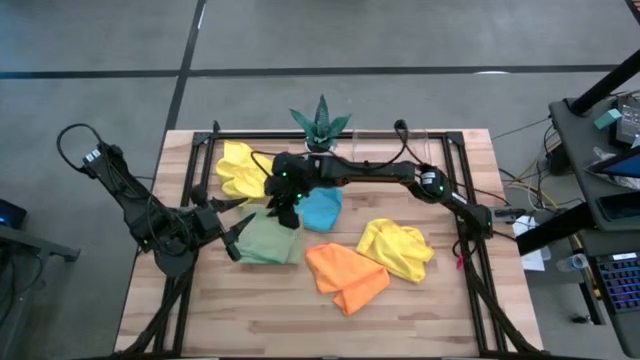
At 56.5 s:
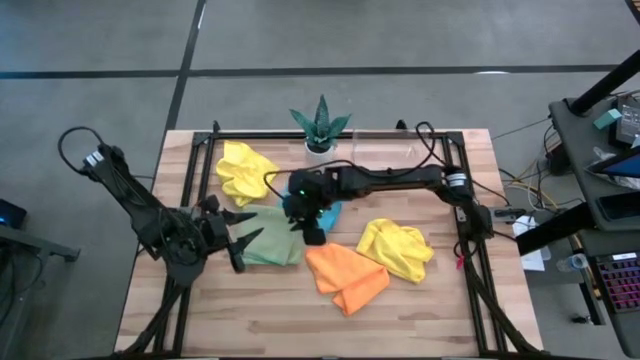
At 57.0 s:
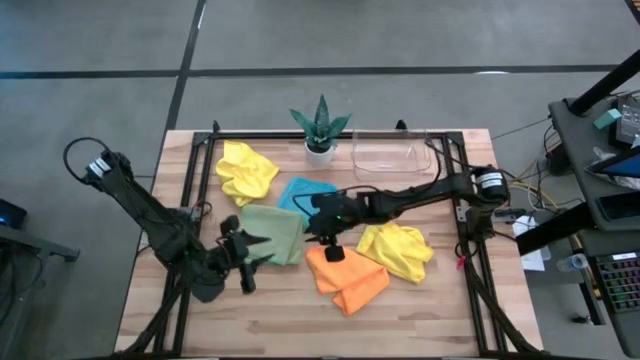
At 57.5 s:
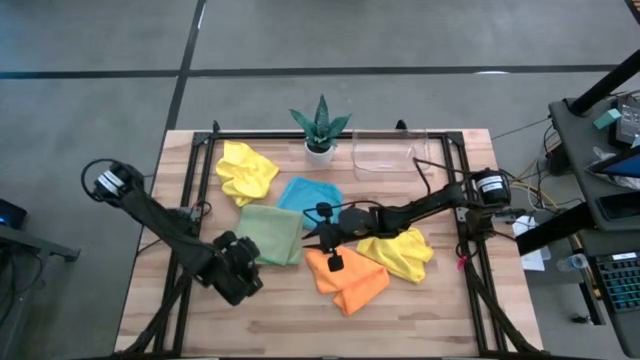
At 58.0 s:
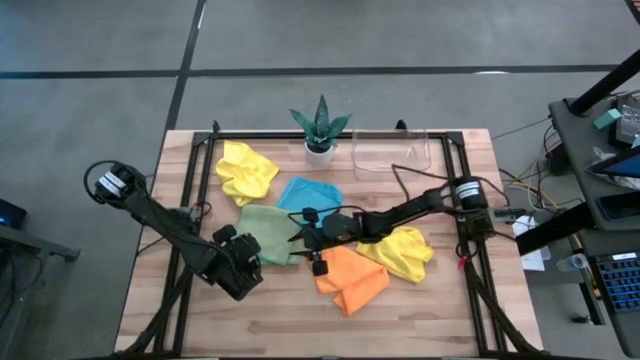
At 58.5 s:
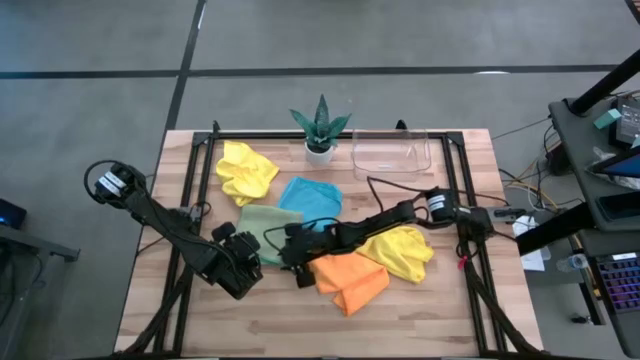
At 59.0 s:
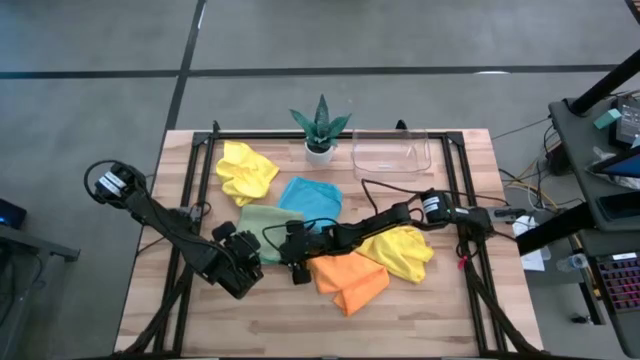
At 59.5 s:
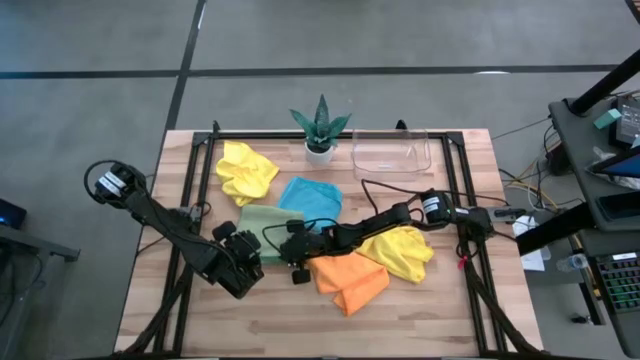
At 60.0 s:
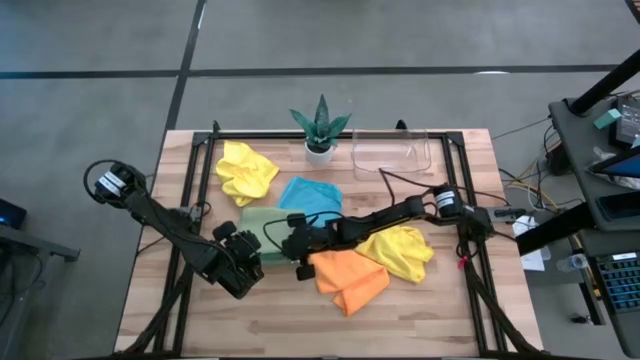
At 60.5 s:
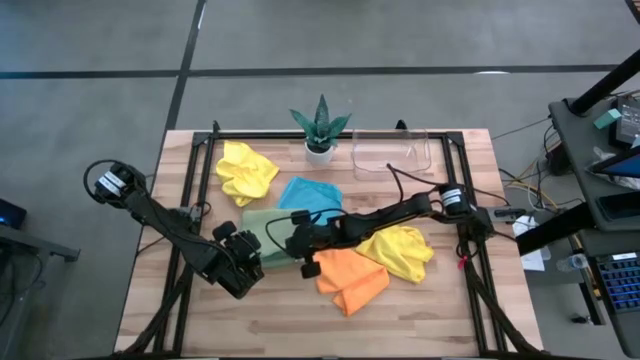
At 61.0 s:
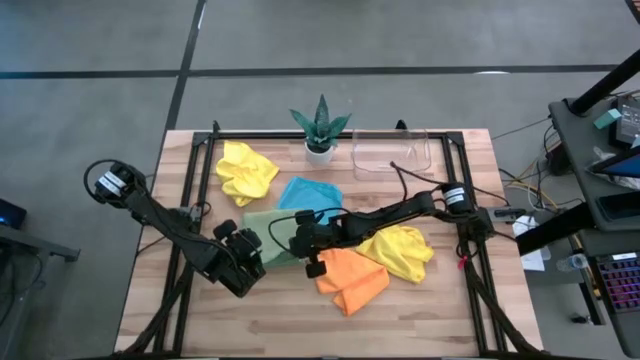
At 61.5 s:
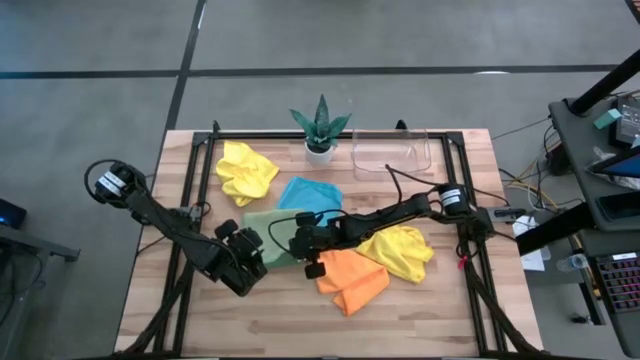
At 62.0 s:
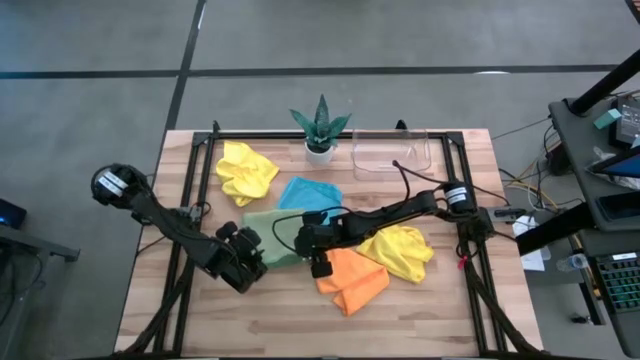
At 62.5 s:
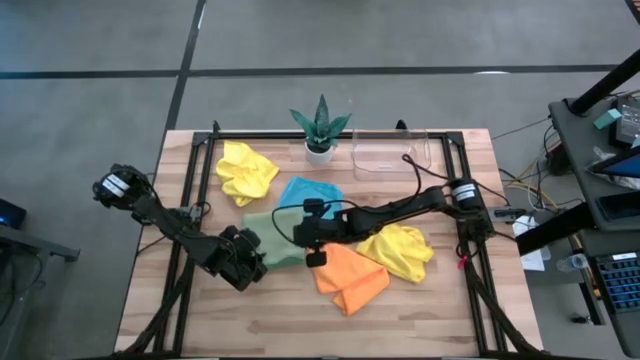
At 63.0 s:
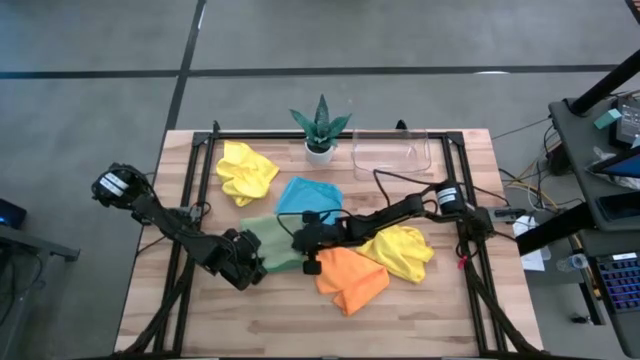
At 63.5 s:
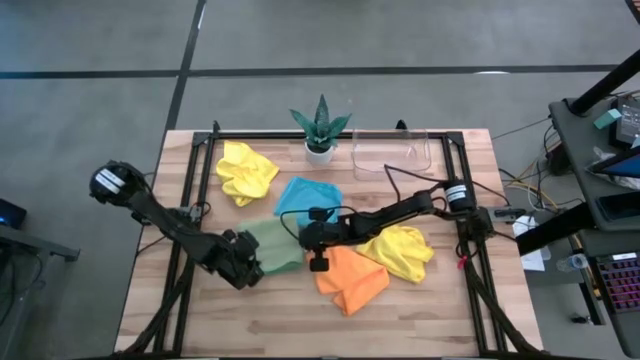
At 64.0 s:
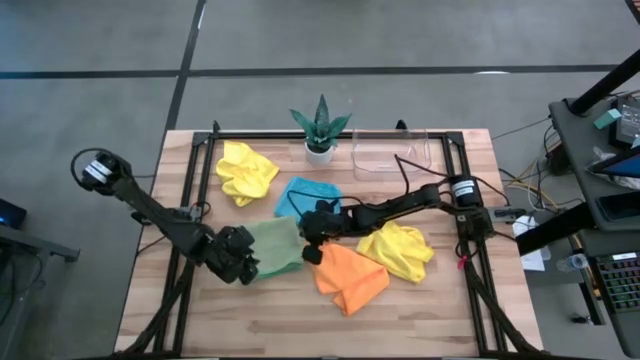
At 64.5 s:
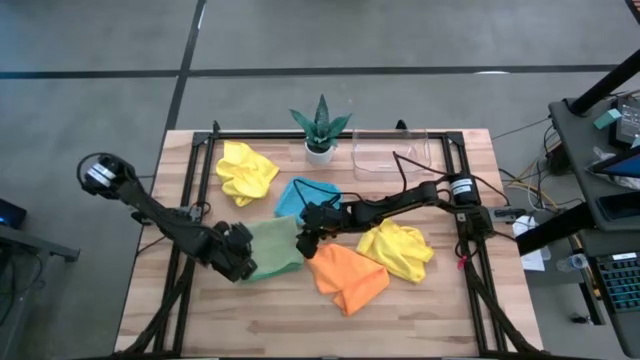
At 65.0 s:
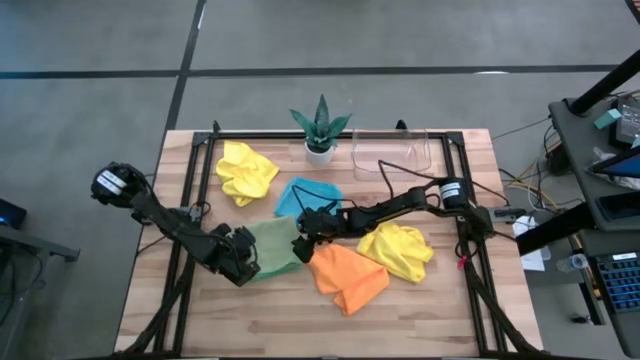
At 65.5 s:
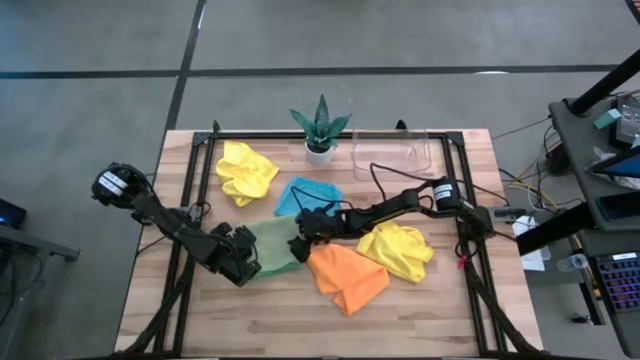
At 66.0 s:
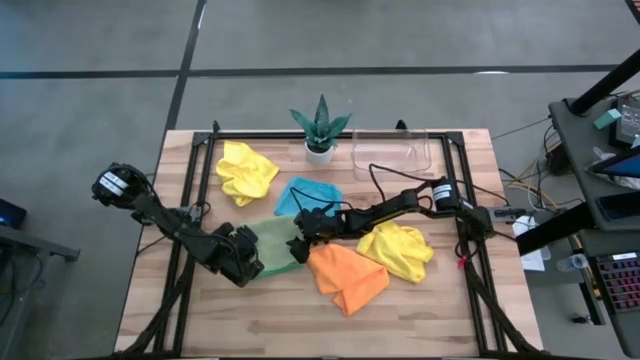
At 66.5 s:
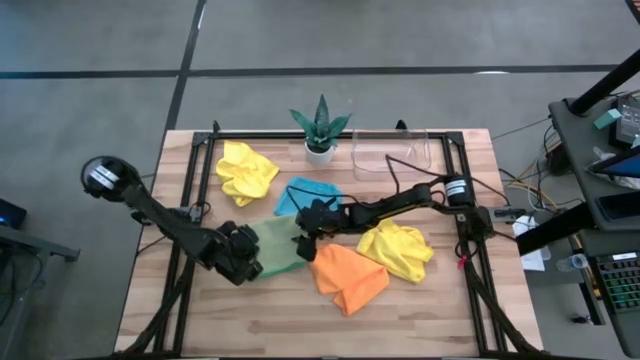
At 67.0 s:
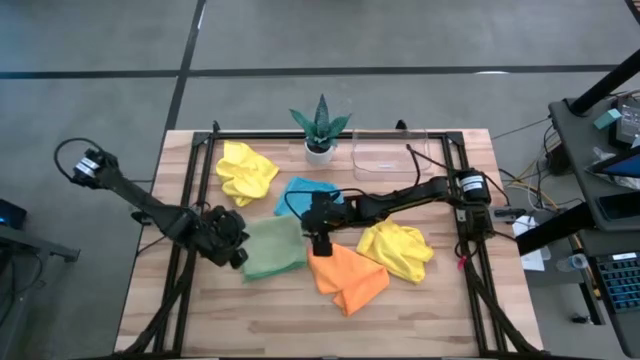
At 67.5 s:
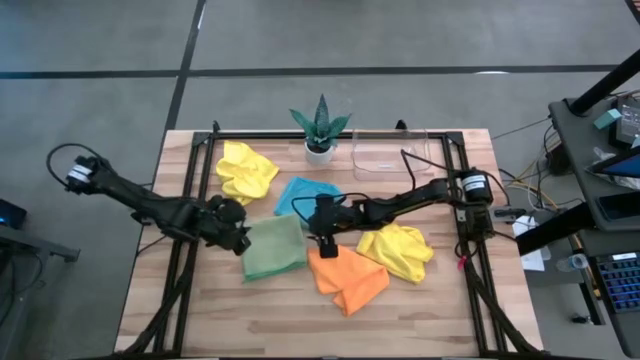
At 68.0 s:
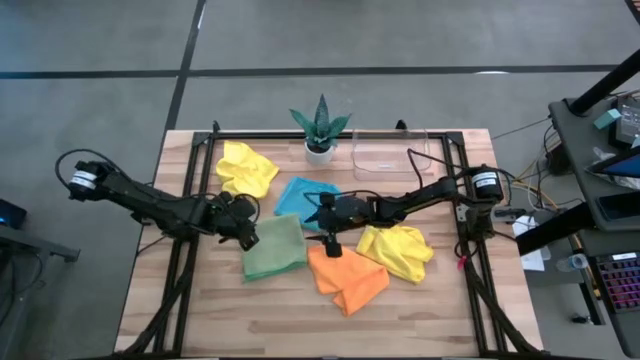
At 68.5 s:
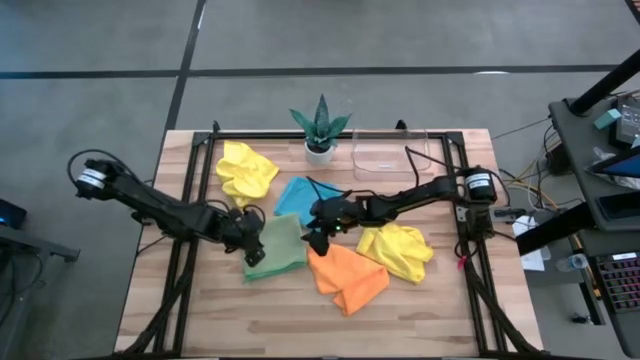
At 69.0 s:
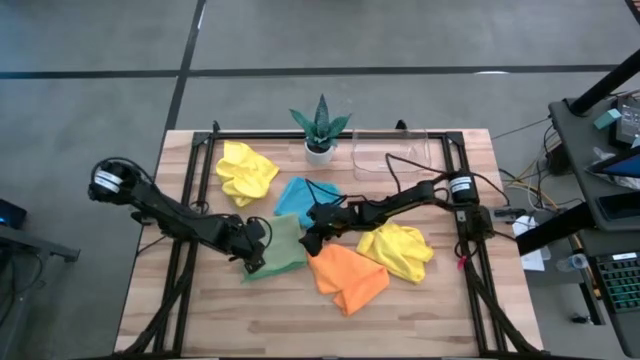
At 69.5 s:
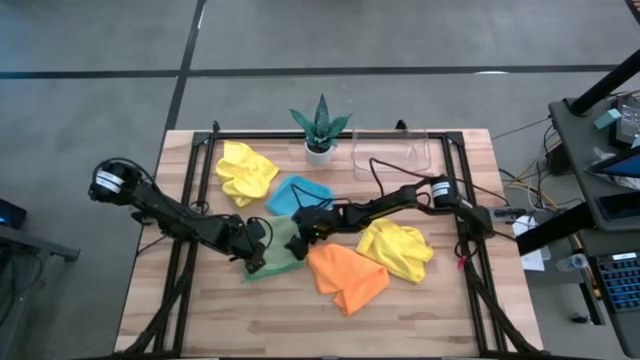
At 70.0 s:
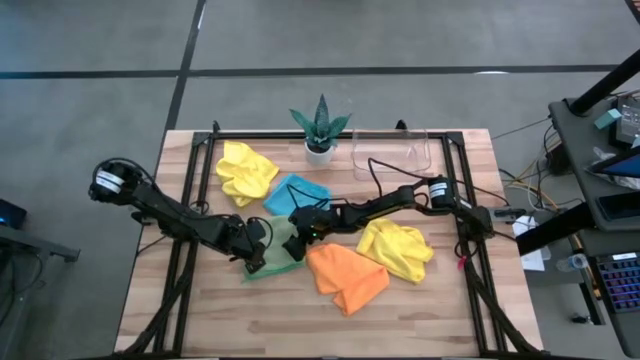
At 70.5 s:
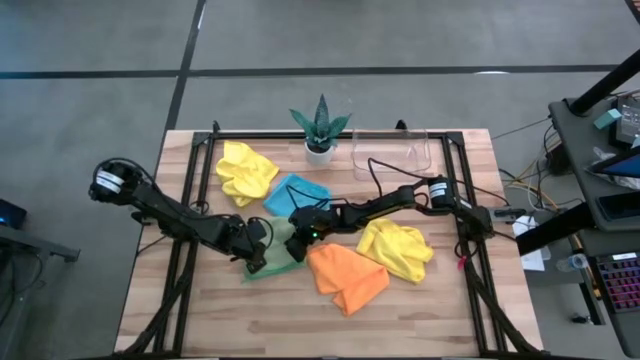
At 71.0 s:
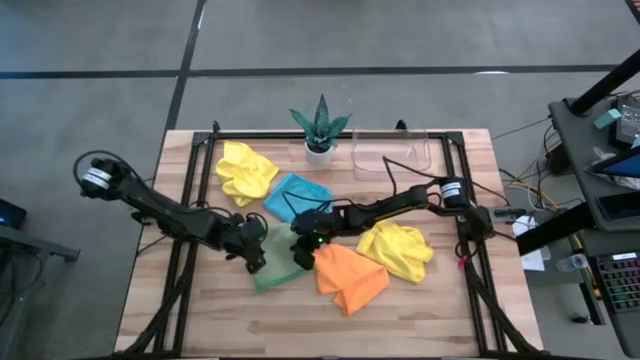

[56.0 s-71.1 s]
Task: Fold microfiber towels
Put the green microfiber towel into the transparent bin

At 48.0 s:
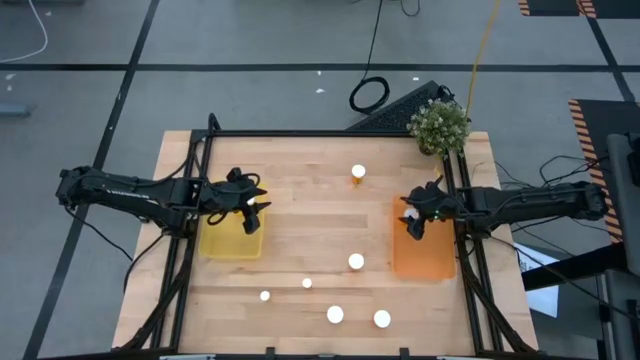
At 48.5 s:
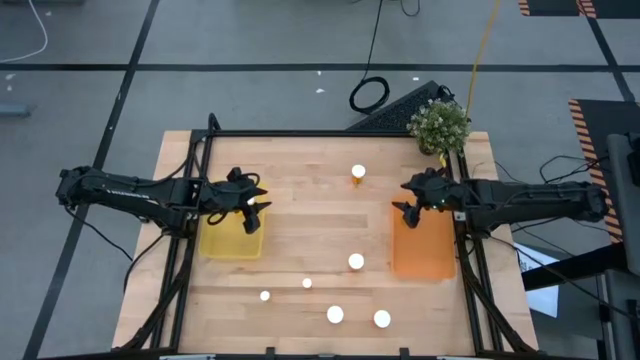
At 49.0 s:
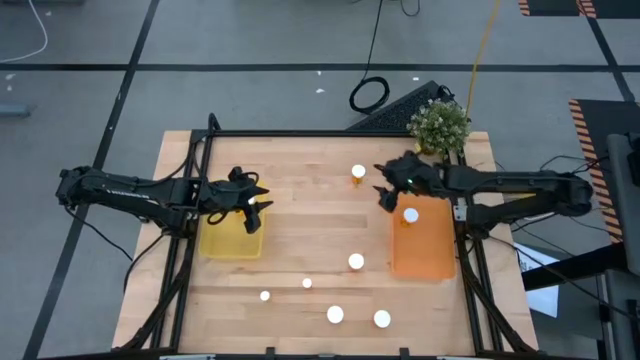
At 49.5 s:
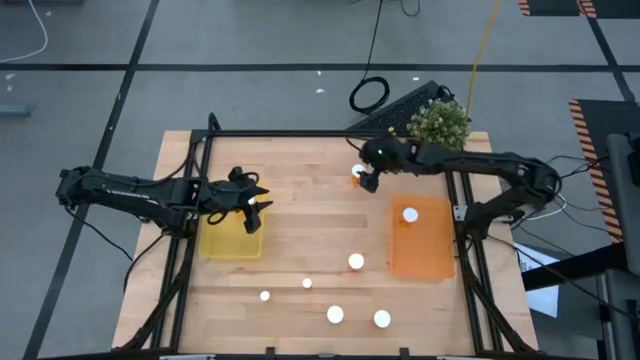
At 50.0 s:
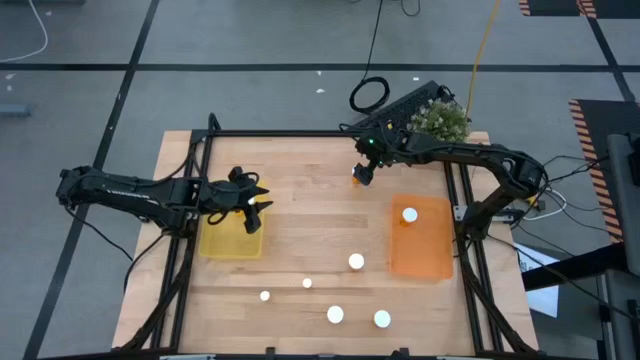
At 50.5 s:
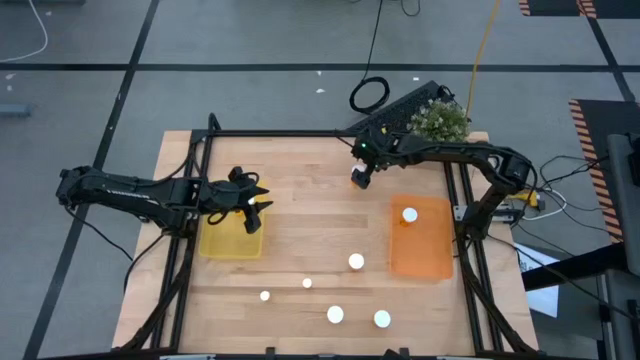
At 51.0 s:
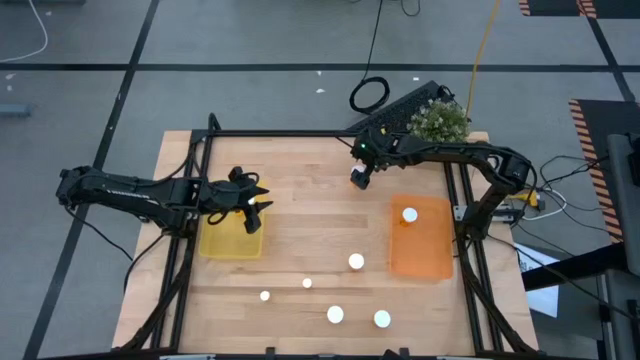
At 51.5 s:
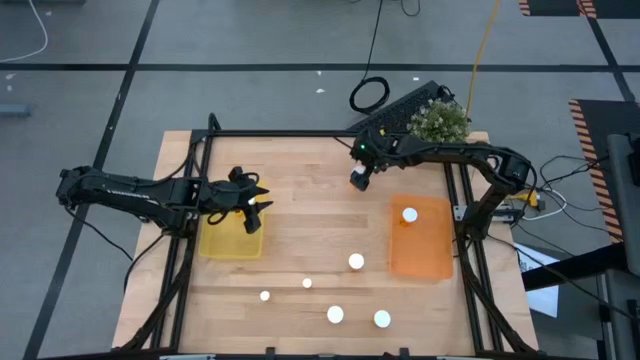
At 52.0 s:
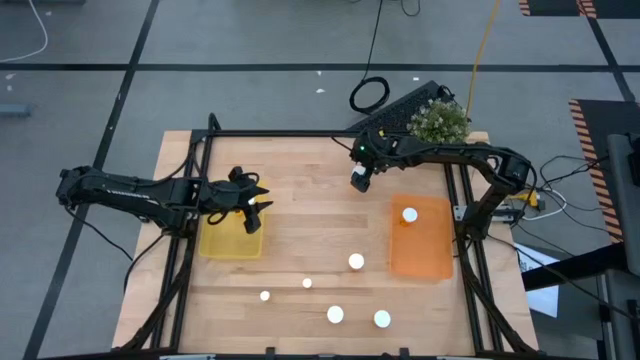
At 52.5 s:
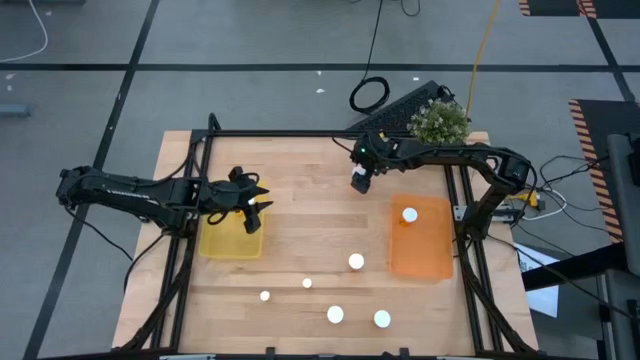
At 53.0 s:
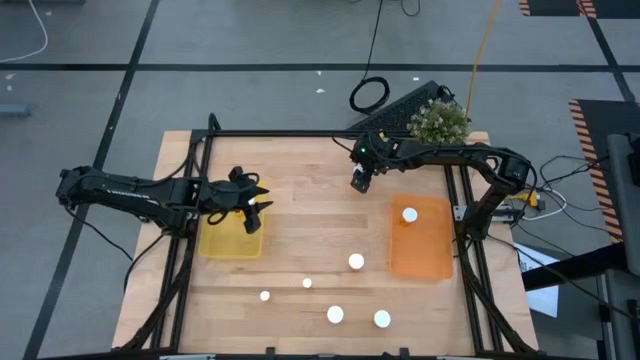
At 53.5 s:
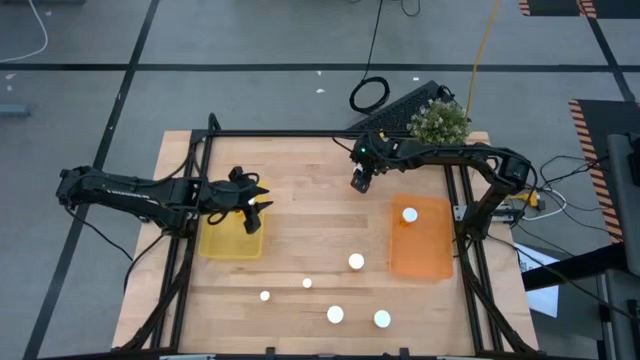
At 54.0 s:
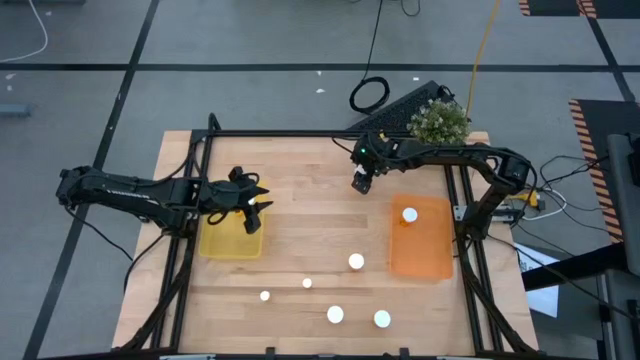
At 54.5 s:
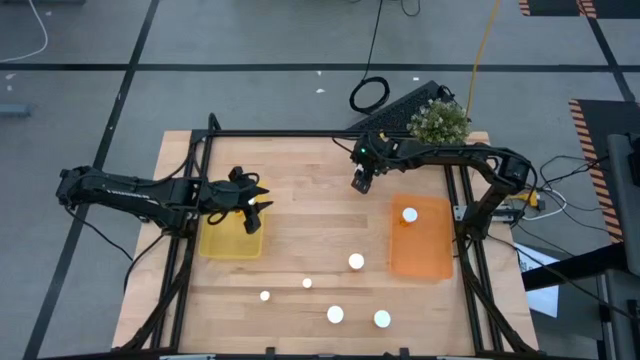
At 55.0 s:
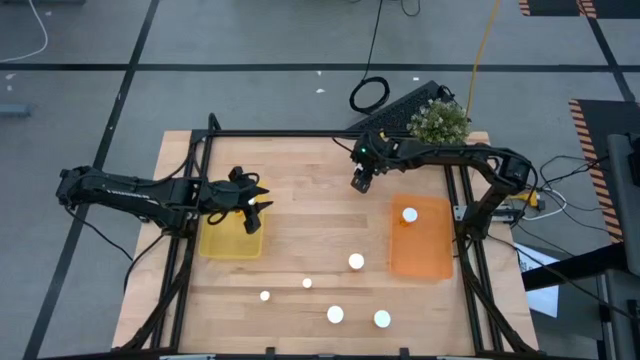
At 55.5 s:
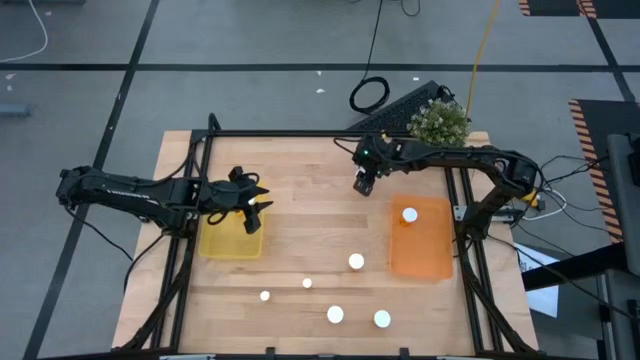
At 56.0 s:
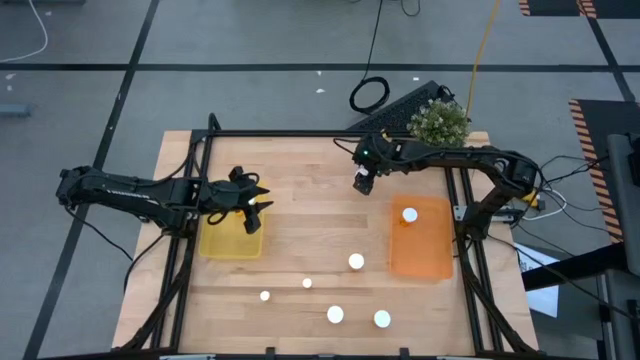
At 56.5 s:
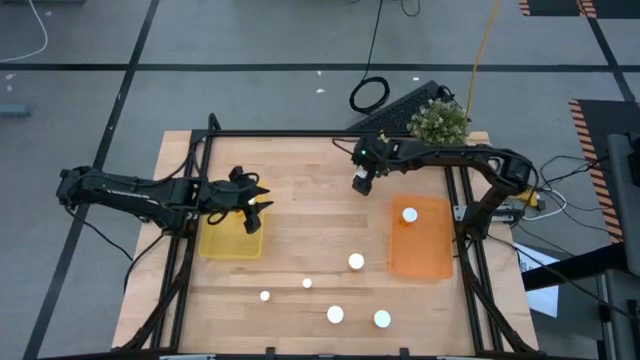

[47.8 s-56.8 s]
Task: Pick and place medicine bottles into bin by pill shape (circle, oval)
Put the large orange pill bottle into the orange bin
